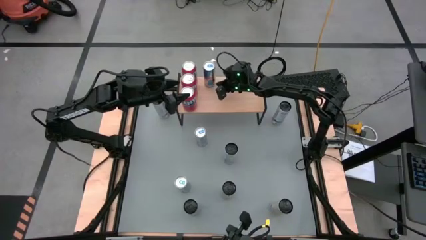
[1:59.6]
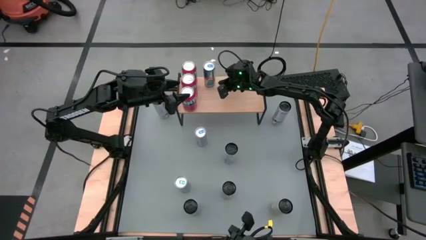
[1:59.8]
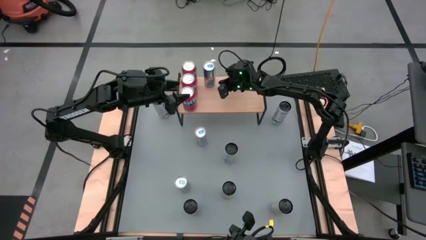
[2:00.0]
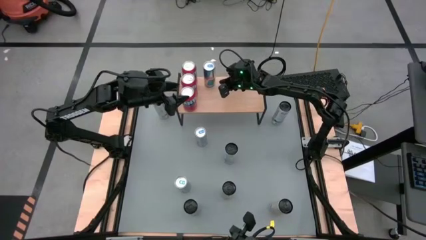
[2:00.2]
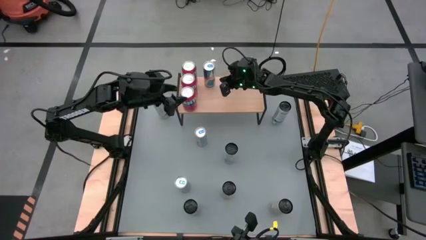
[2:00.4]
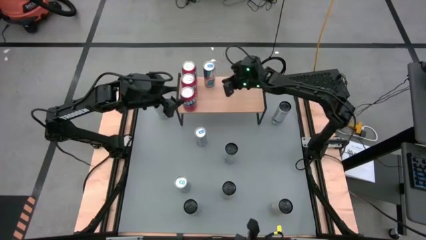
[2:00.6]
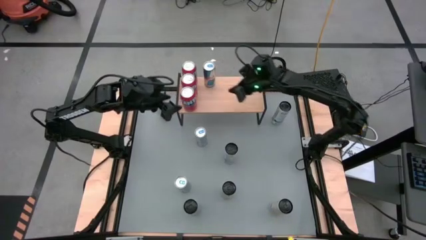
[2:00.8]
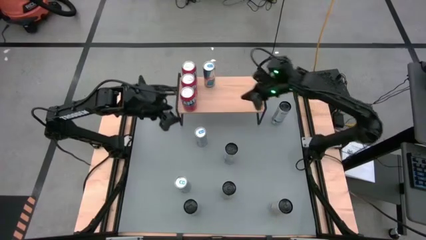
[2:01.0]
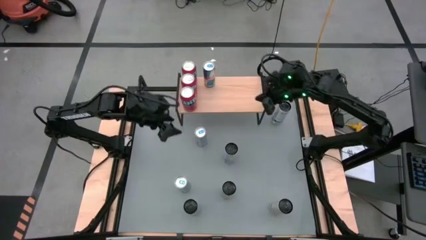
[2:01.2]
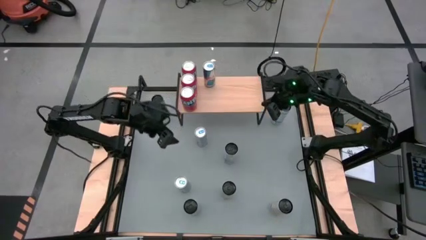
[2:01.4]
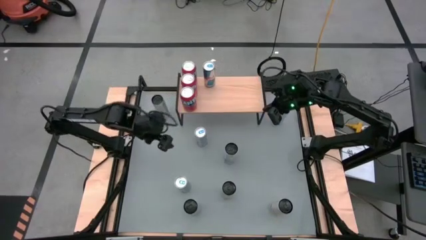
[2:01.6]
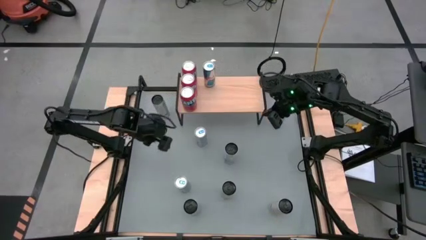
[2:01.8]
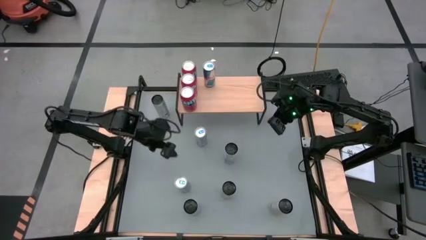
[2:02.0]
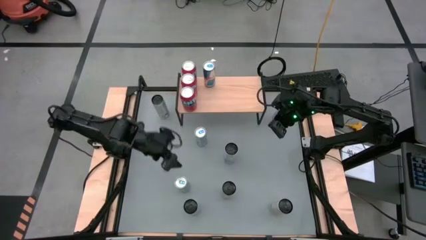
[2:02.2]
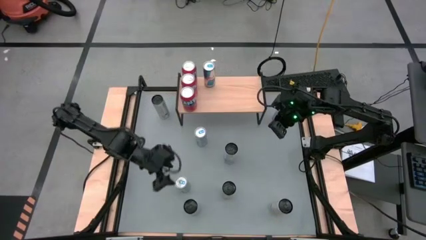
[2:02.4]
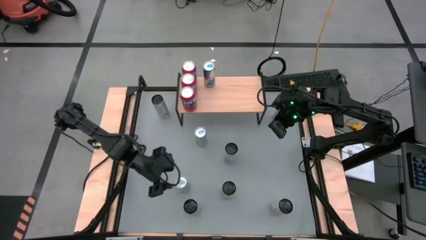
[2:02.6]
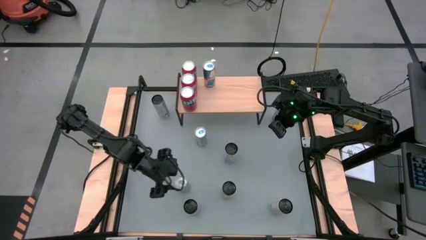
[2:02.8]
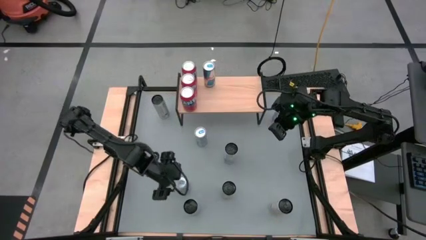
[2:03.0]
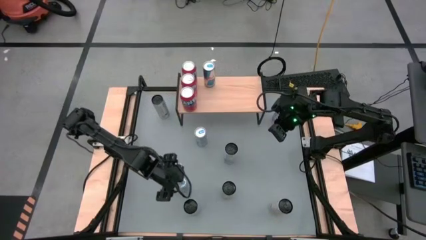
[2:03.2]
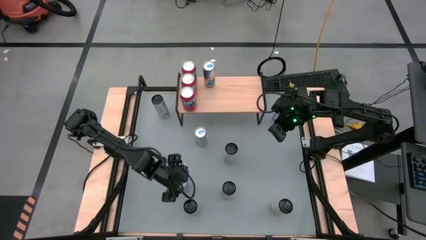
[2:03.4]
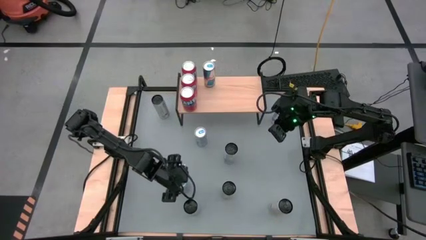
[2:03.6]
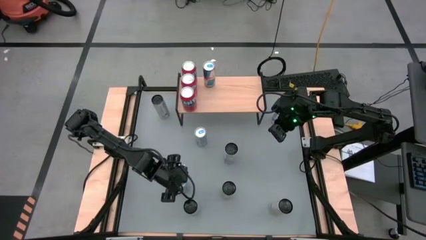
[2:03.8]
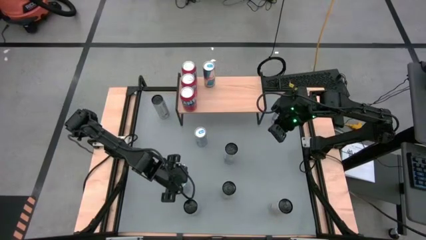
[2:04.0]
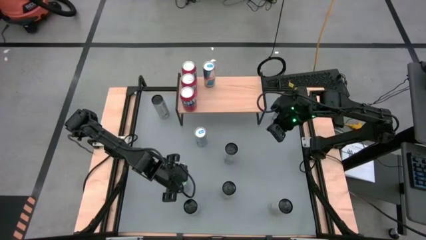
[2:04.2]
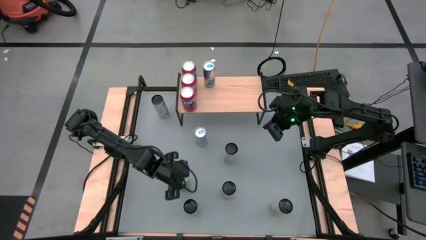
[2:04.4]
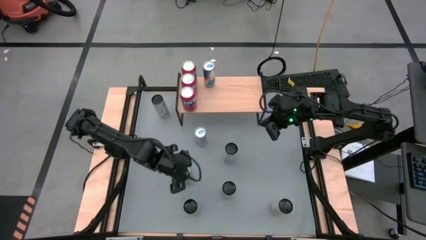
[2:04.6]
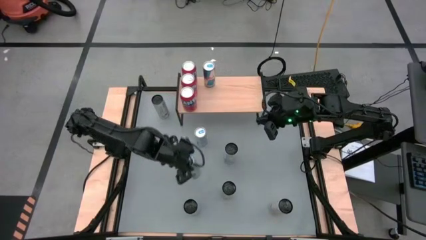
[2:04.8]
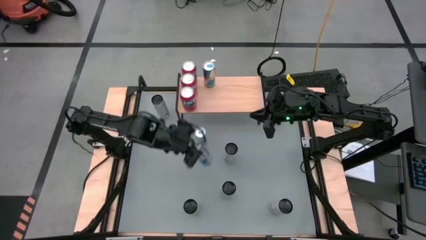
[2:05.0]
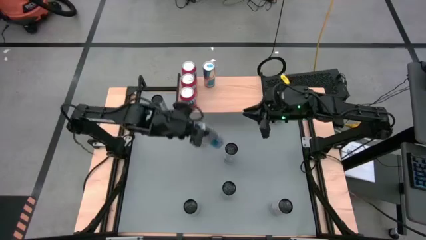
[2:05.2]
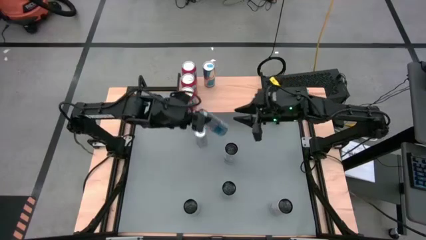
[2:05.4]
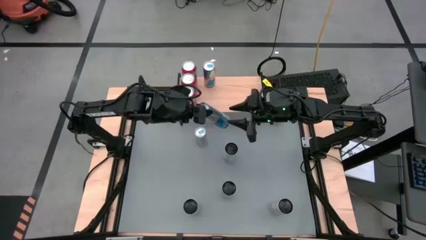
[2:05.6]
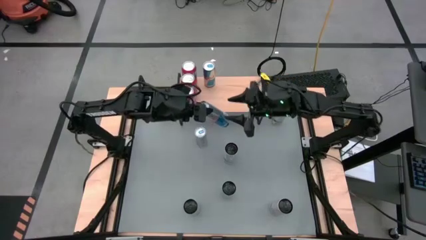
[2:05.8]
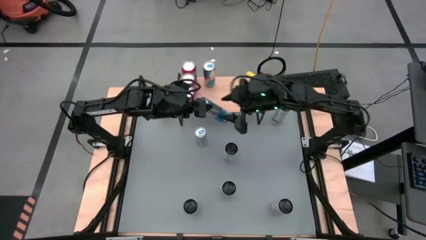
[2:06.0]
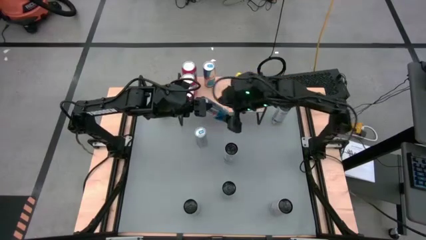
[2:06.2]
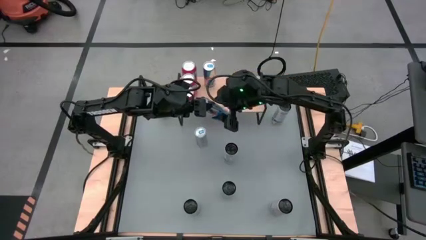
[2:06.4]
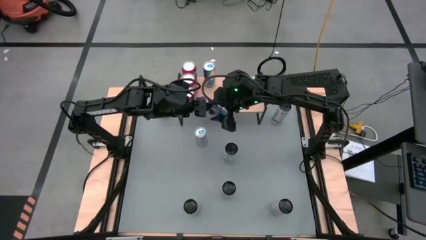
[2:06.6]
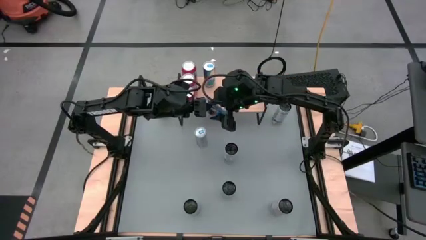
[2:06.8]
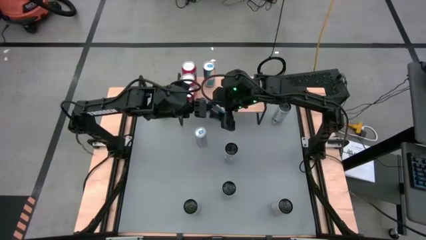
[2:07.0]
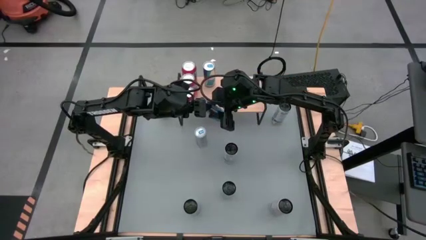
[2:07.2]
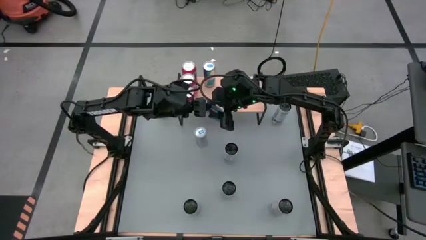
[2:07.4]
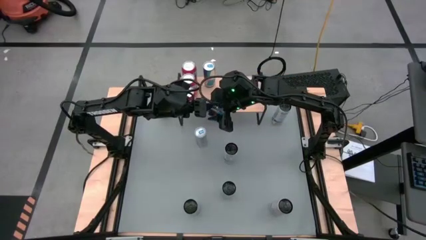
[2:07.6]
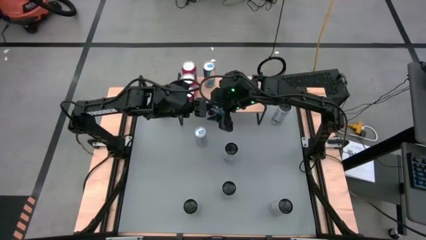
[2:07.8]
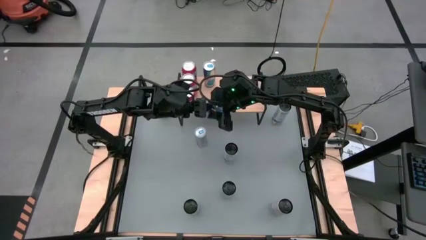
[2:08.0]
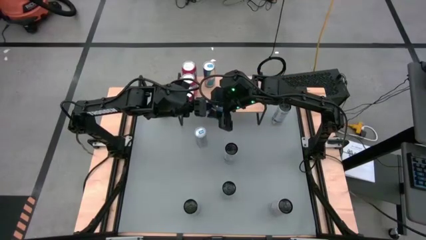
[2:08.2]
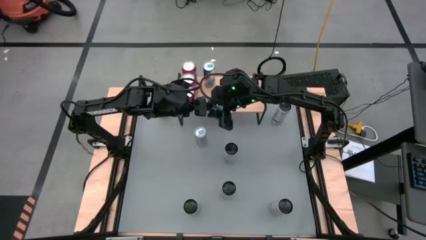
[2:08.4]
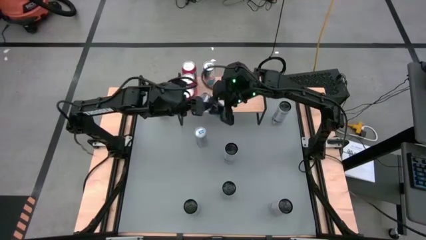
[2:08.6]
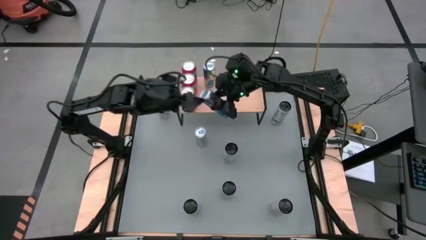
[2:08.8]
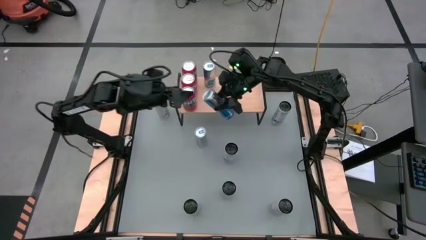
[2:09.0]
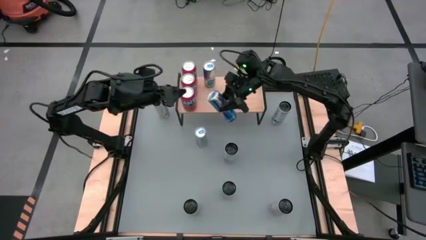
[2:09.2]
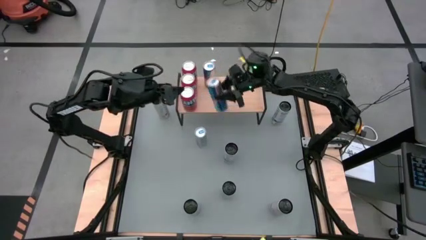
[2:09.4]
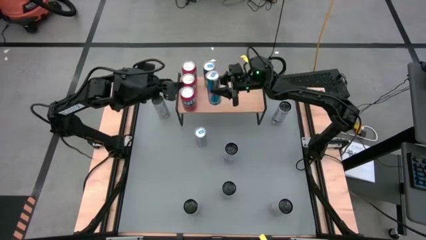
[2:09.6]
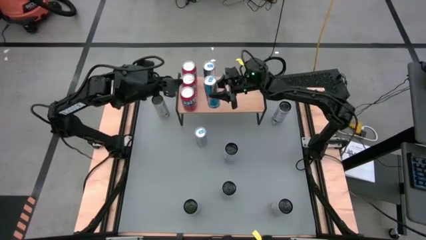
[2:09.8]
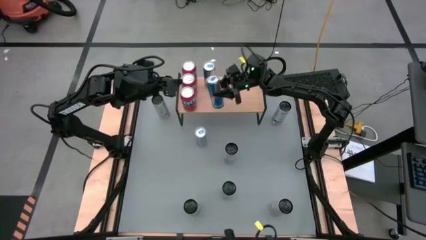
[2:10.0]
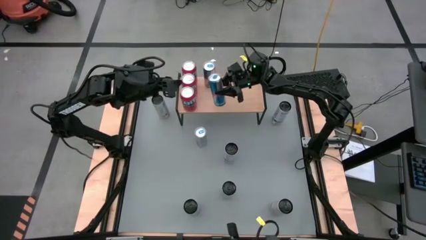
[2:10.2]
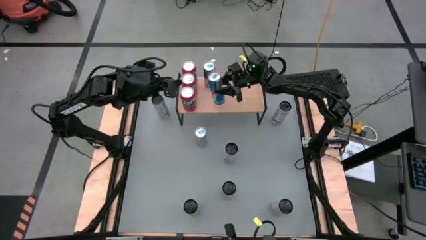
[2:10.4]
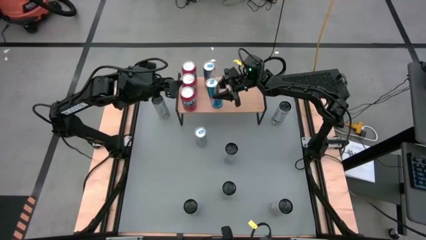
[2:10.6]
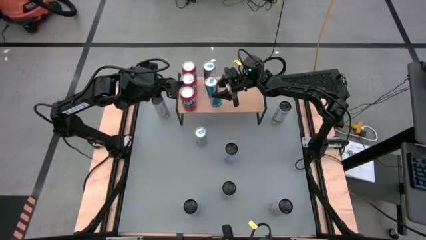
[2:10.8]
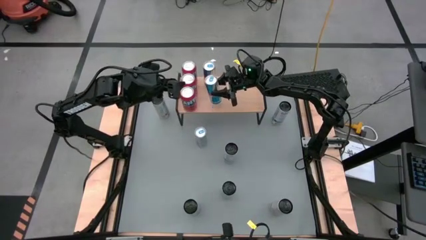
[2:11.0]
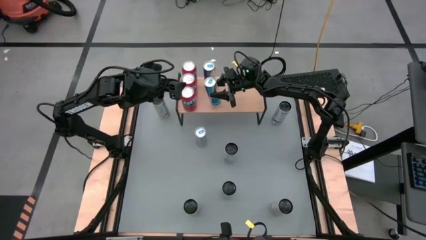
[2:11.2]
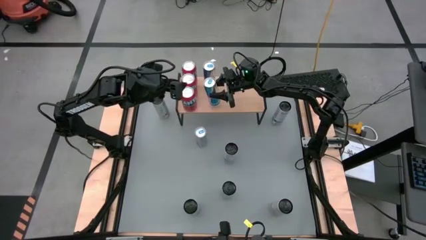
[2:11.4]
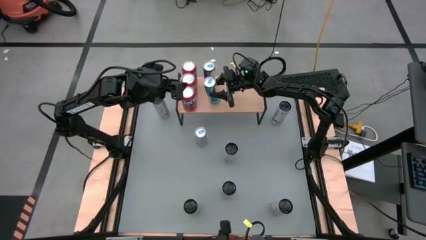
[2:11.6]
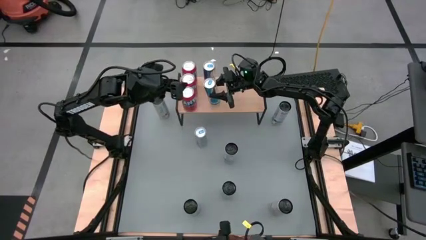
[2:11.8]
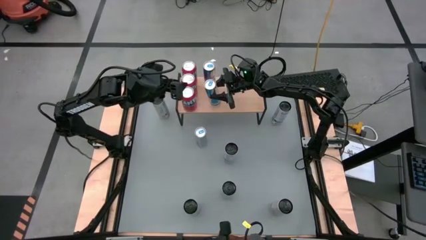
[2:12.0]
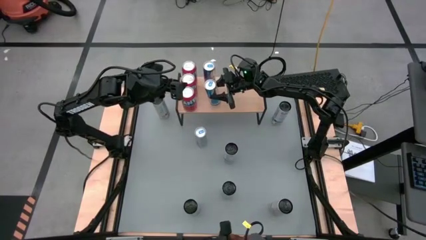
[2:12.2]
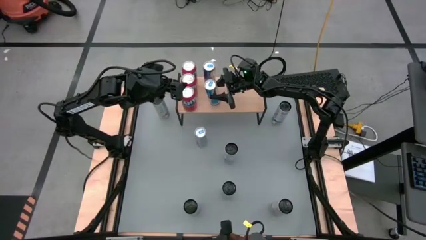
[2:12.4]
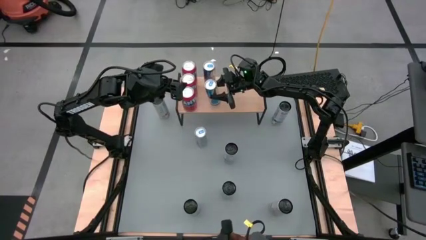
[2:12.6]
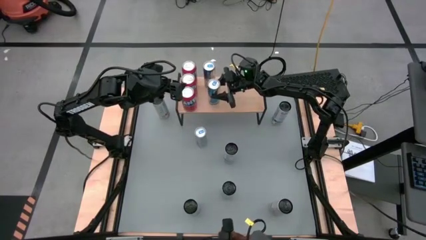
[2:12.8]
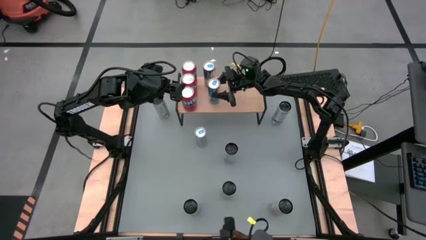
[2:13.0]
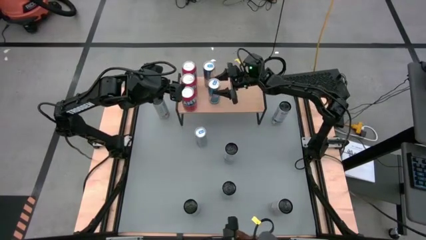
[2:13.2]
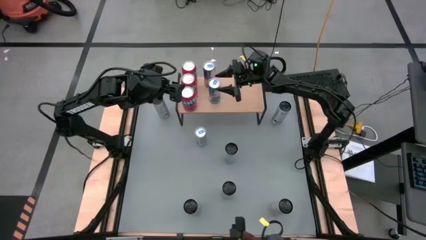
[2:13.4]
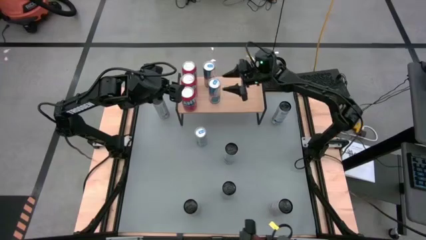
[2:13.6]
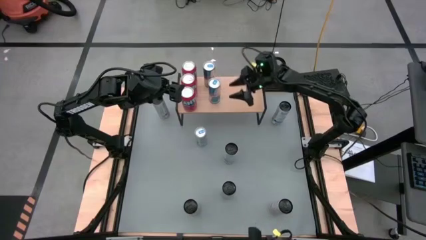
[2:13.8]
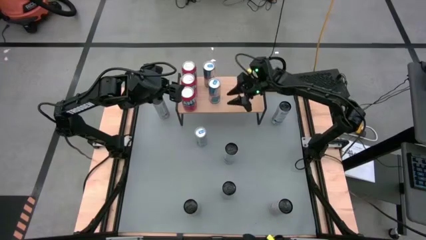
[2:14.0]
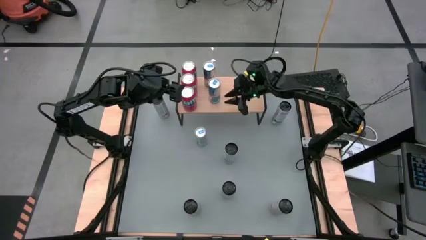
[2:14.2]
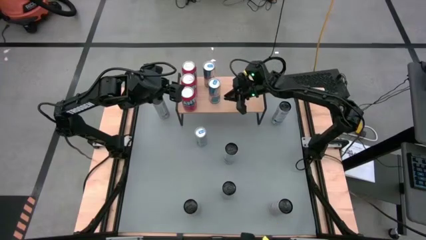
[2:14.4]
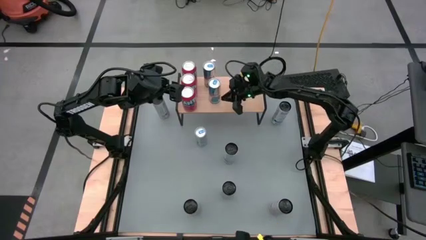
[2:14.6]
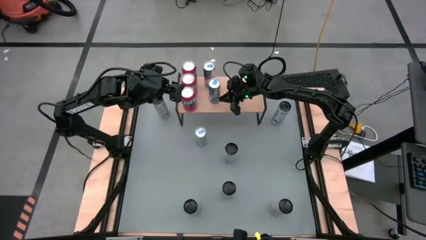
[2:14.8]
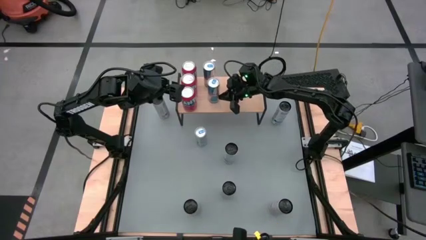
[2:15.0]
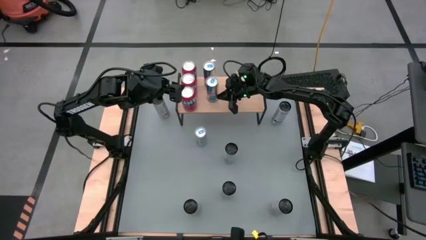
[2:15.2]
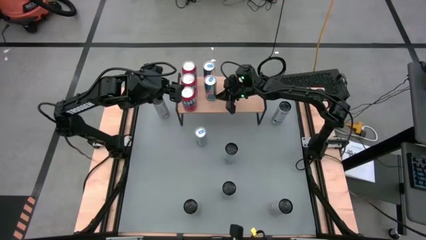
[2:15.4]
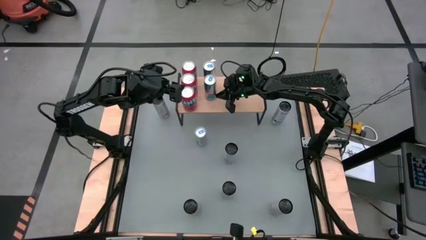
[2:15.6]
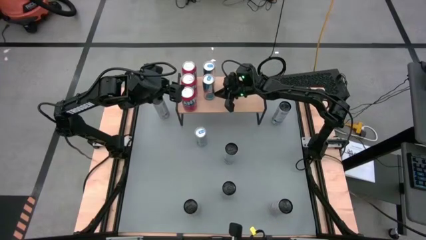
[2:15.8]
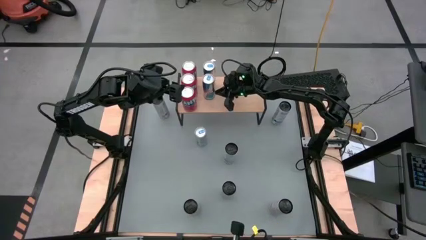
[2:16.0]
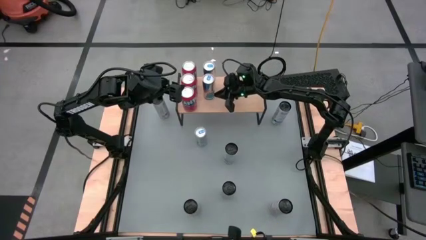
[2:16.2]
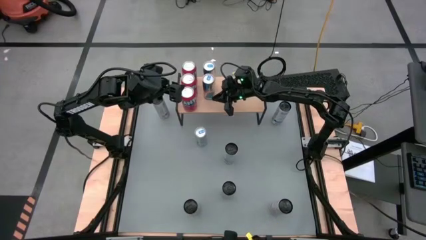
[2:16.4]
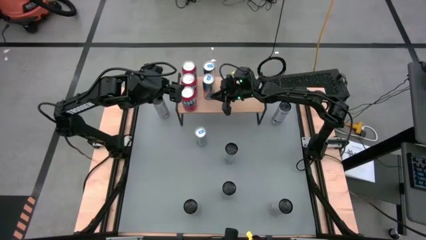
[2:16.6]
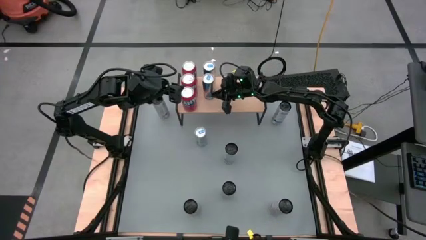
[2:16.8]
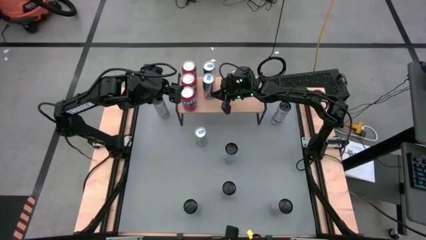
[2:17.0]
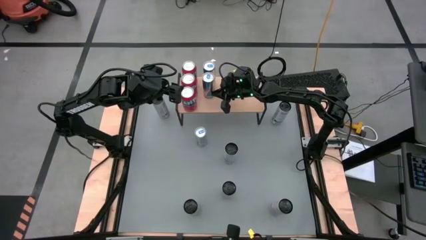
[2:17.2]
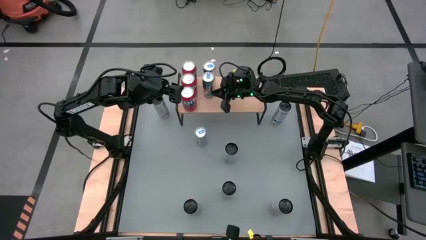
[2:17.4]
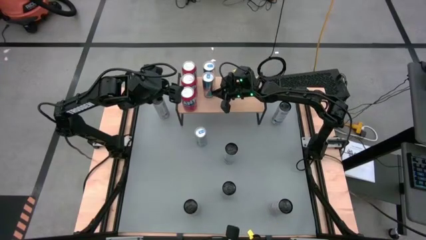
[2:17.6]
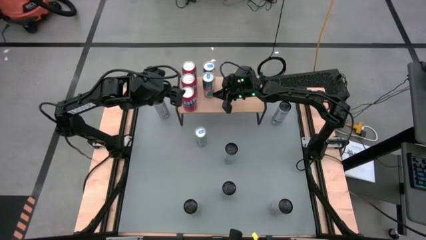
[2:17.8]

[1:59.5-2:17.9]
Task: Place canned beverage on shelf
Put the bottom blue soda can on the shelf aligned with the other blue soda can
